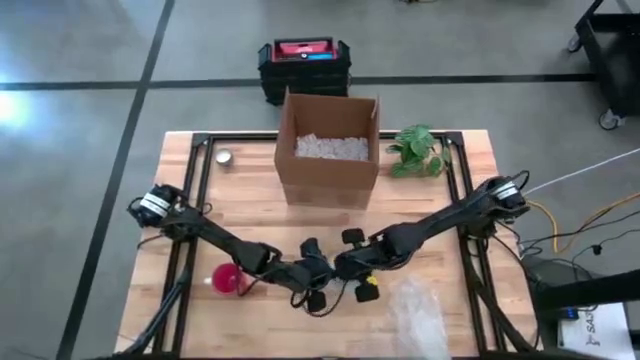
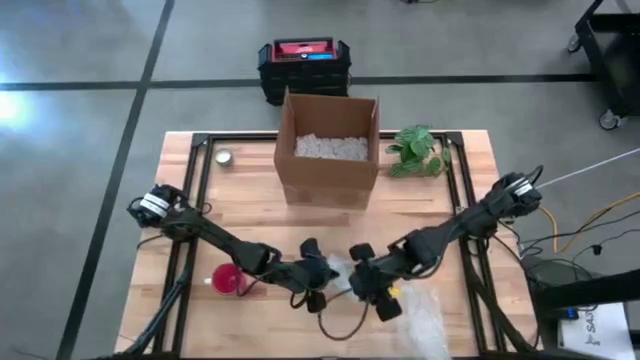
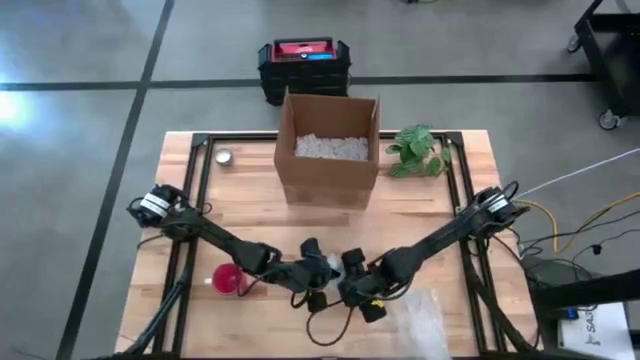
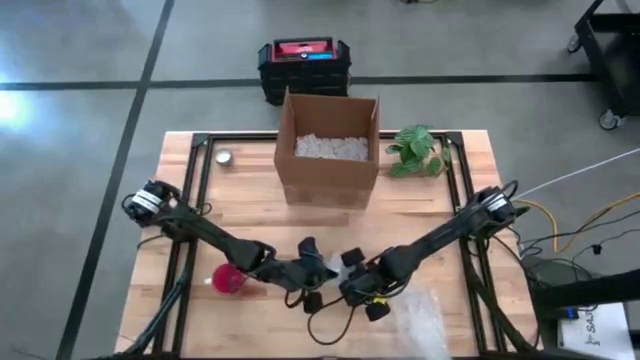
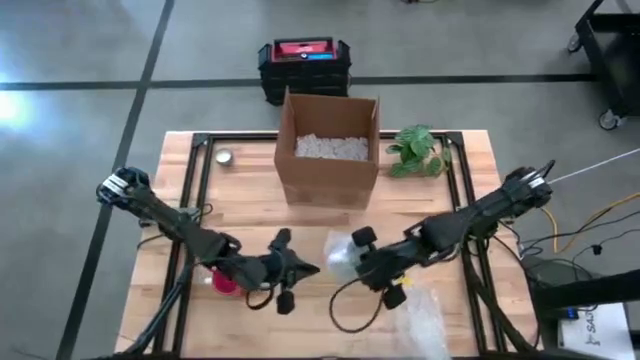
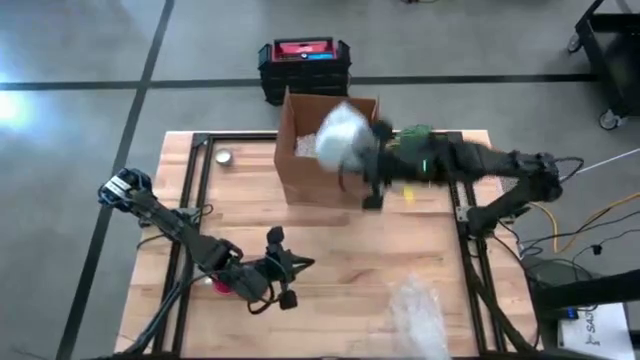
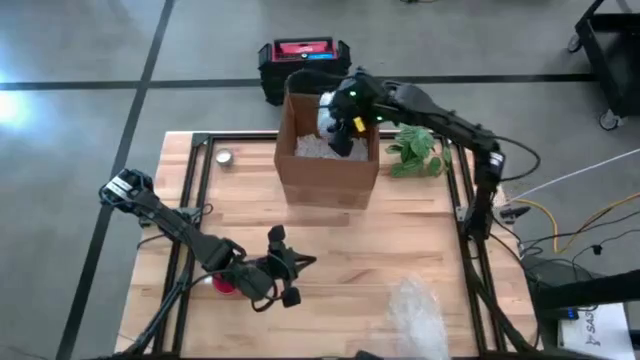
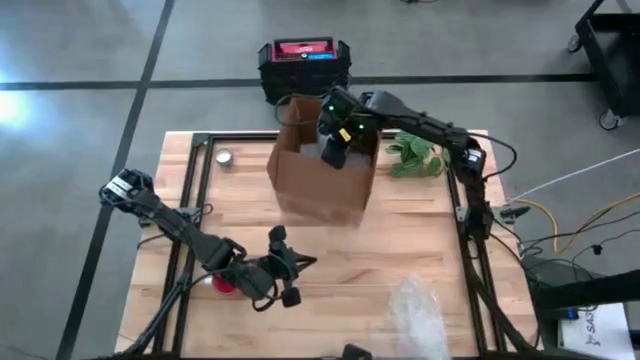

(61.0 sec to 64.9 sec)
Task: wrap mug
Put the wrapped white mug into the cardboard box

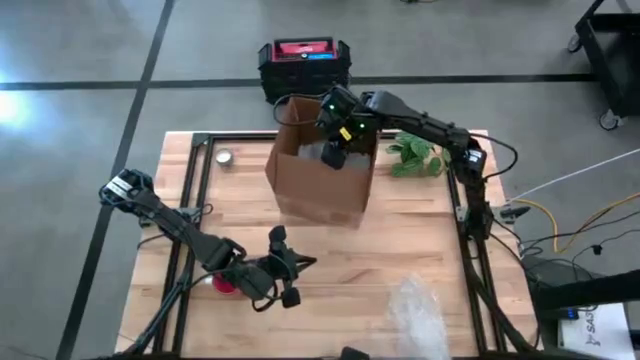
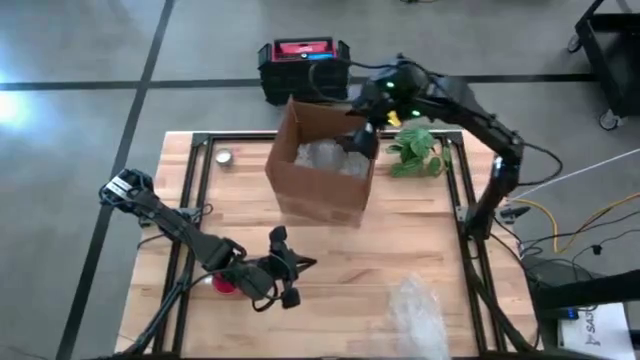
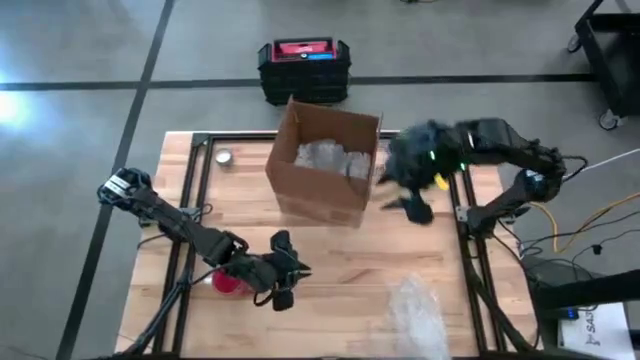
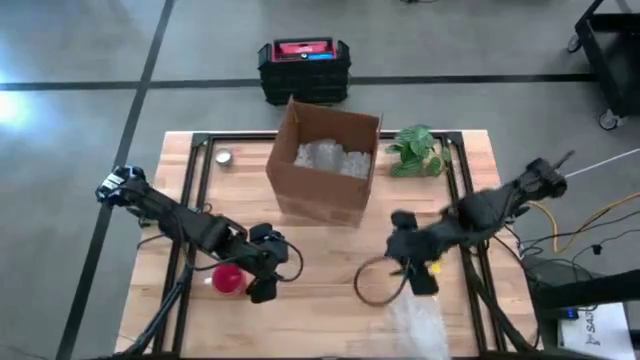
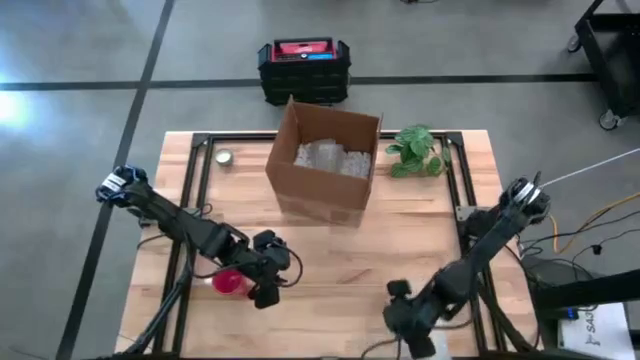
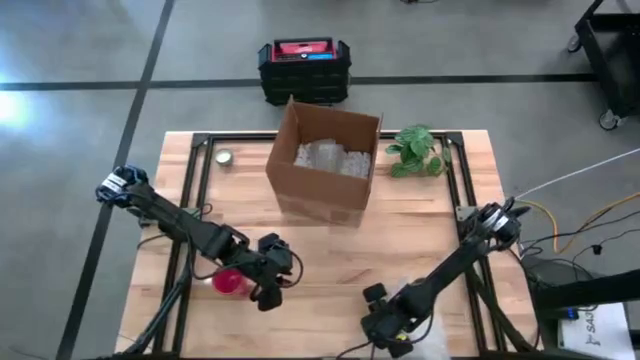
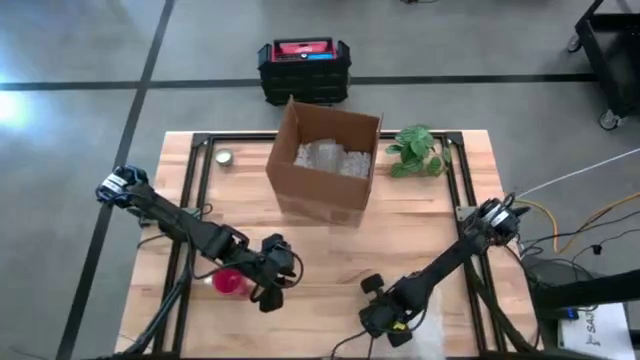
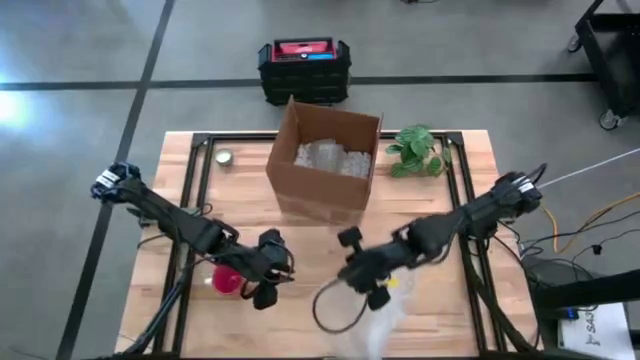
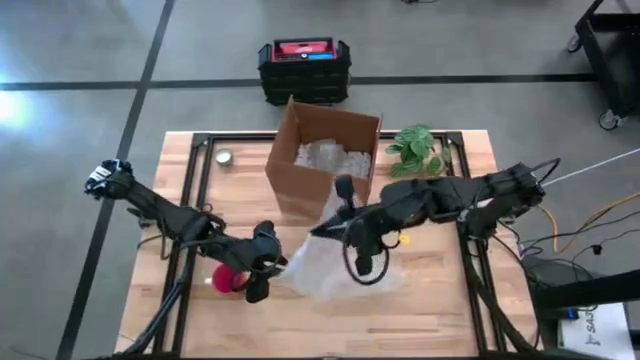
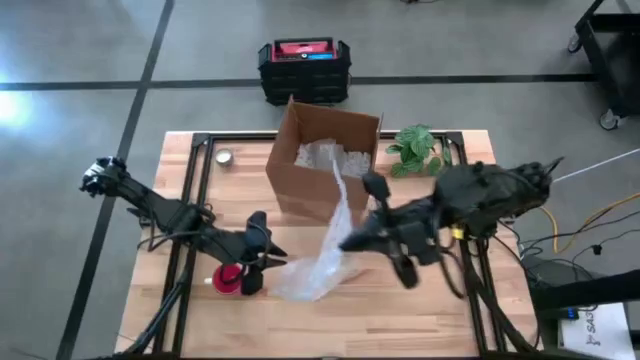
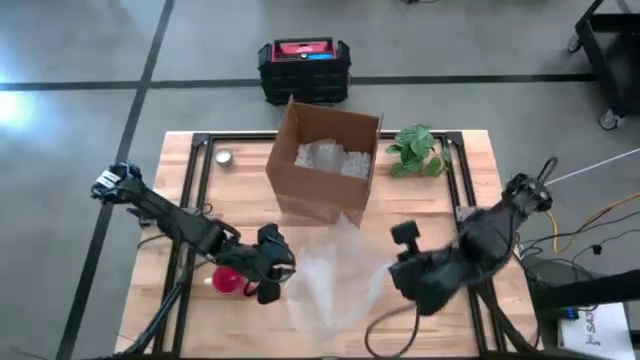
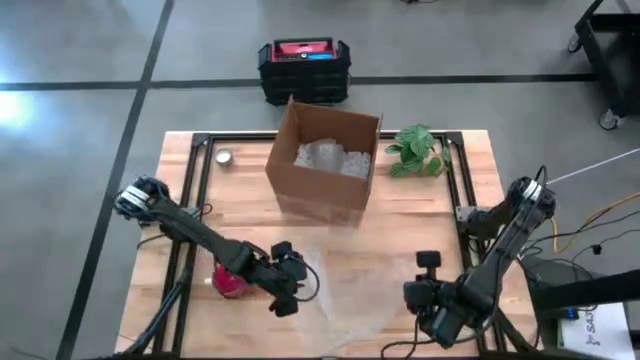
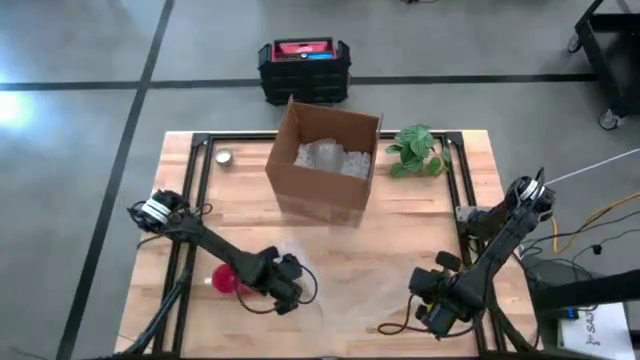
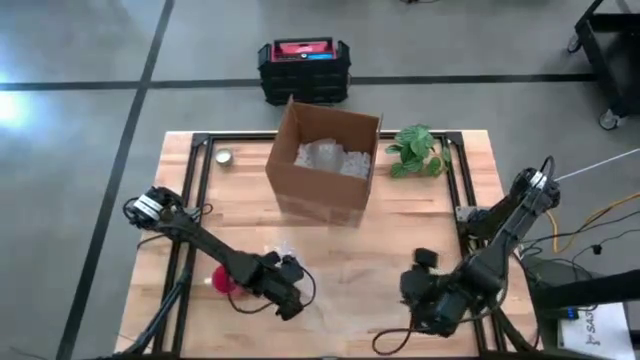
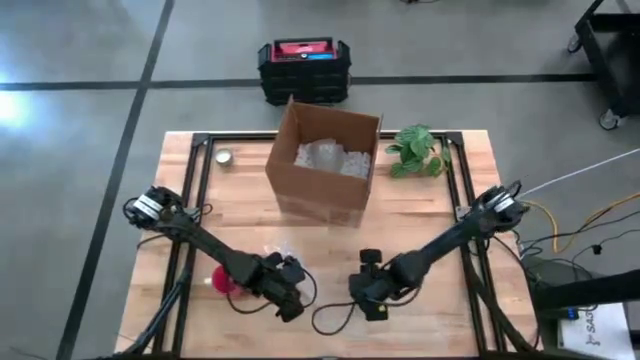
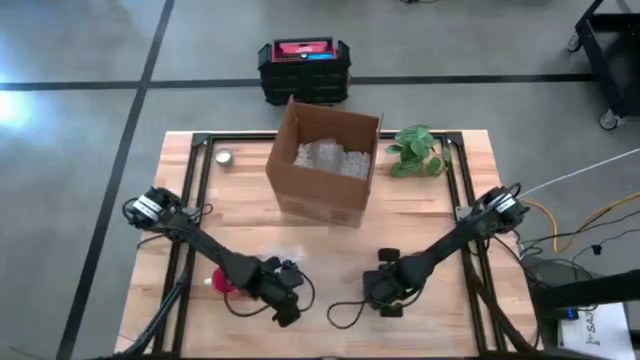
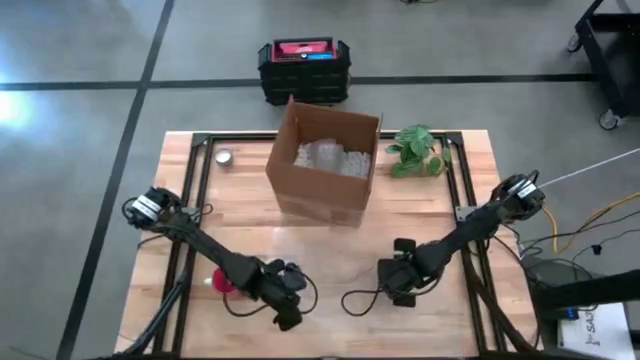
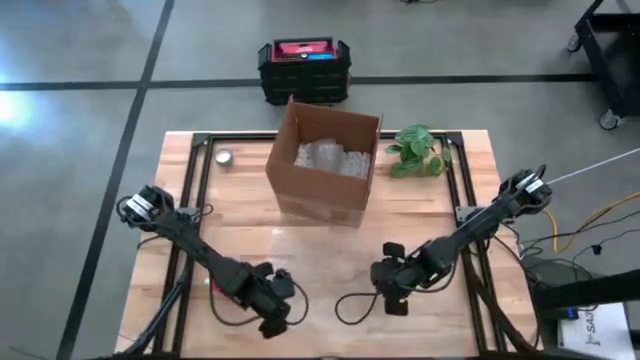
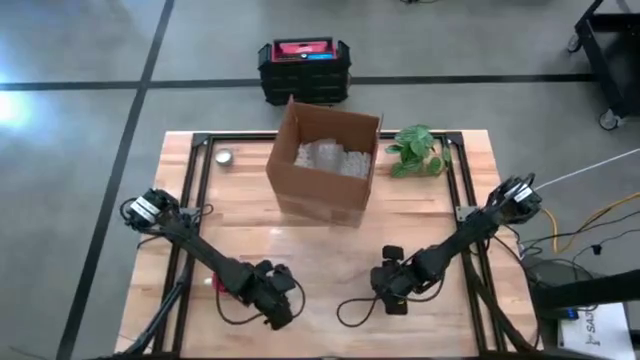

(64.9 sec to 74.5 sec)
Prepare the bubble wrap

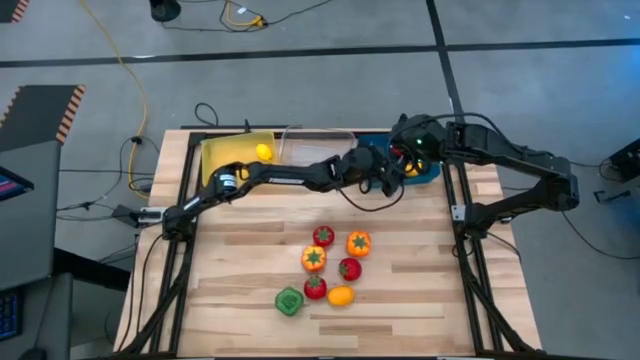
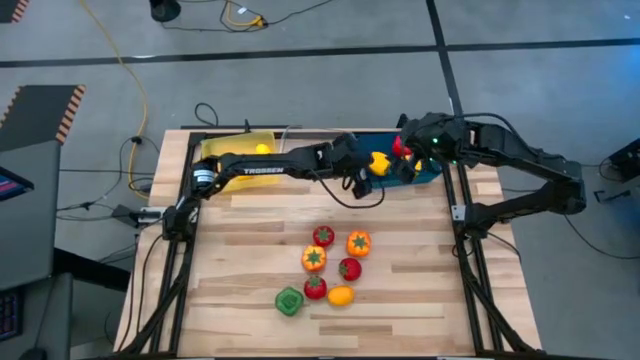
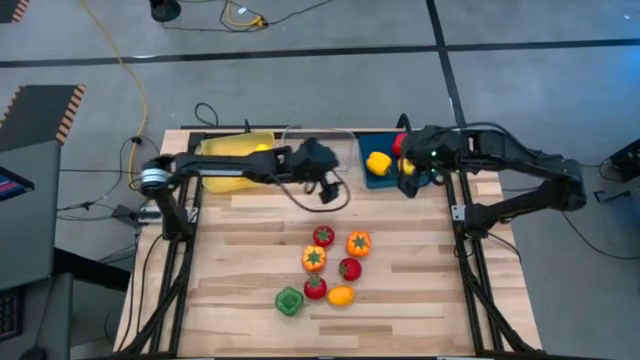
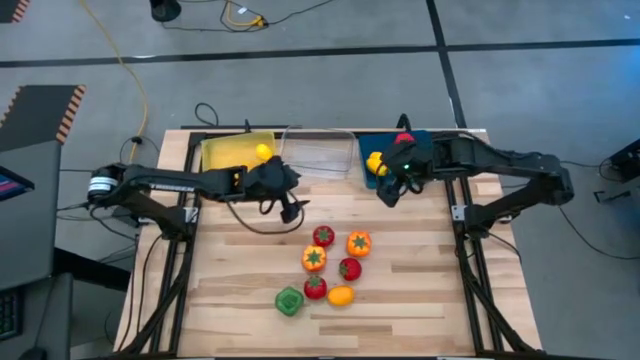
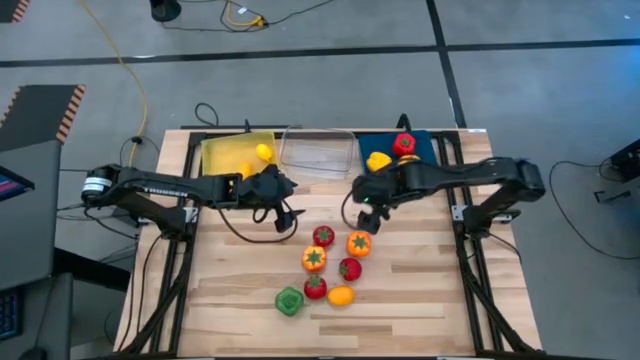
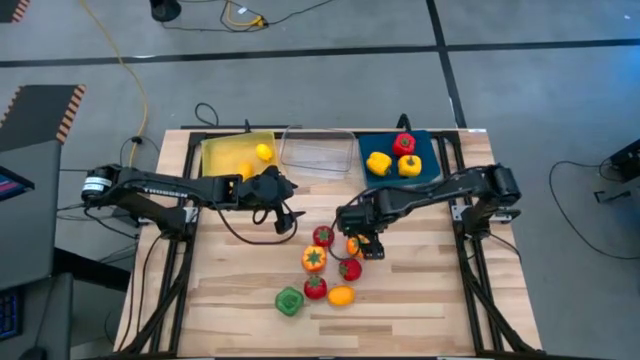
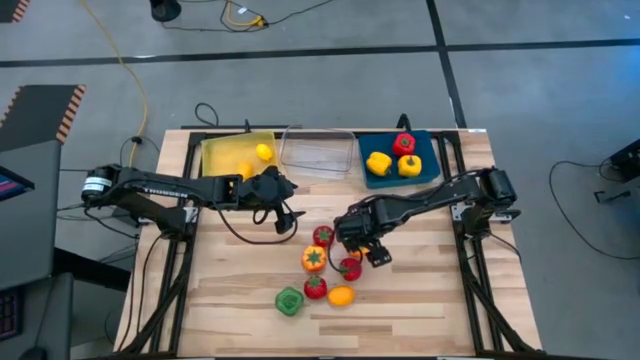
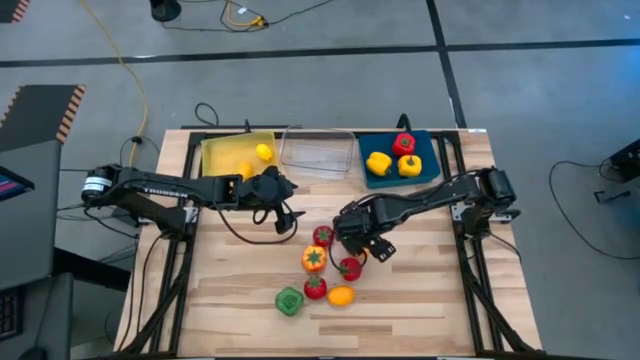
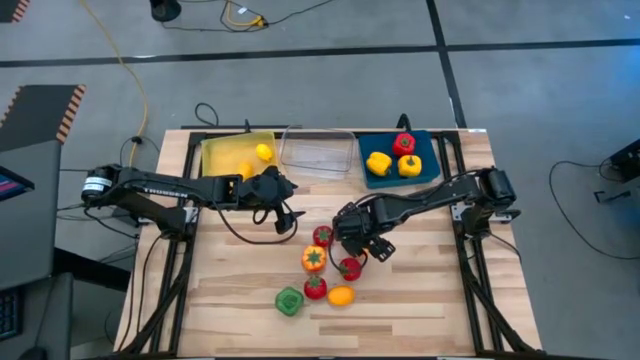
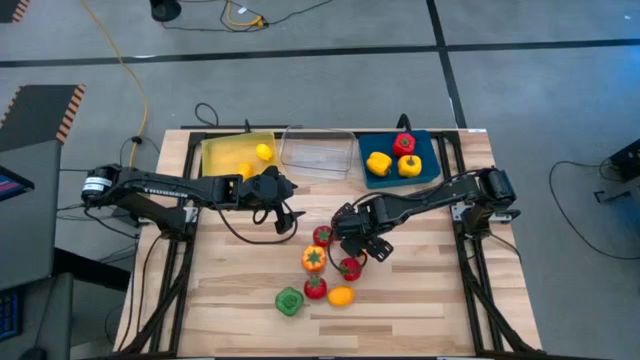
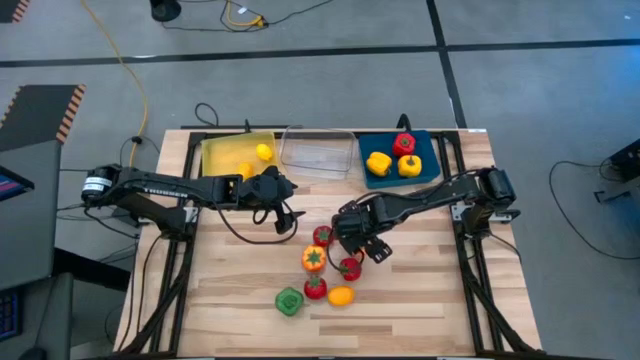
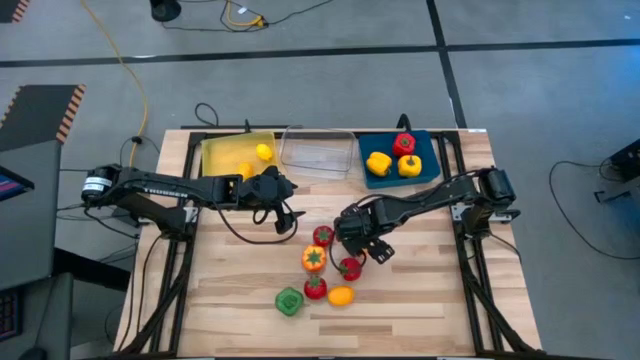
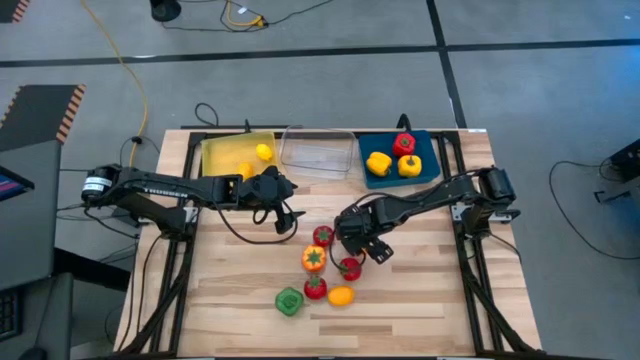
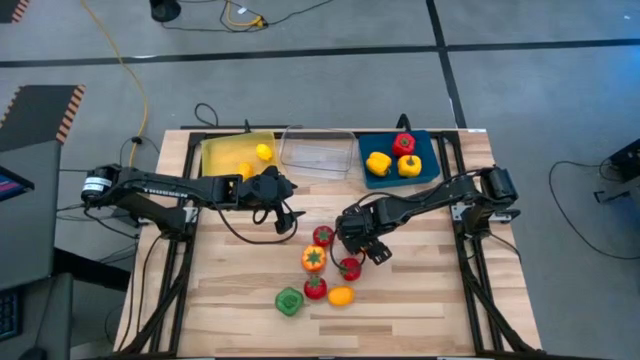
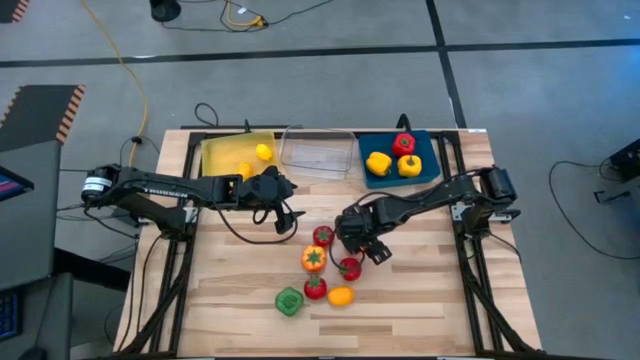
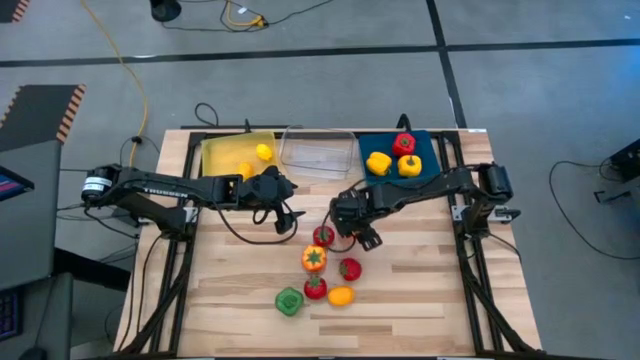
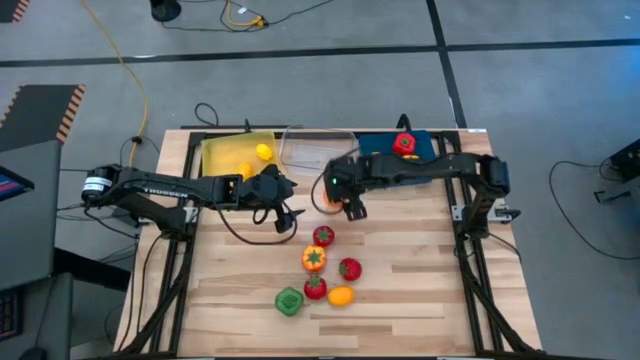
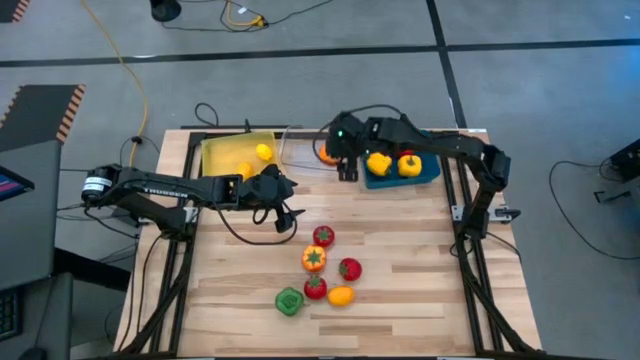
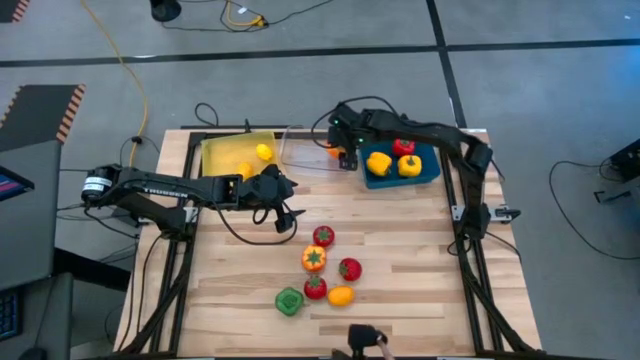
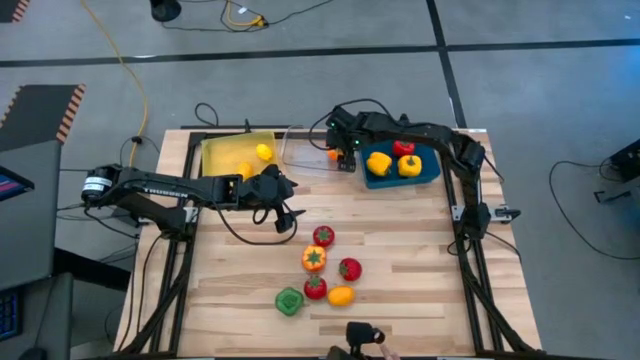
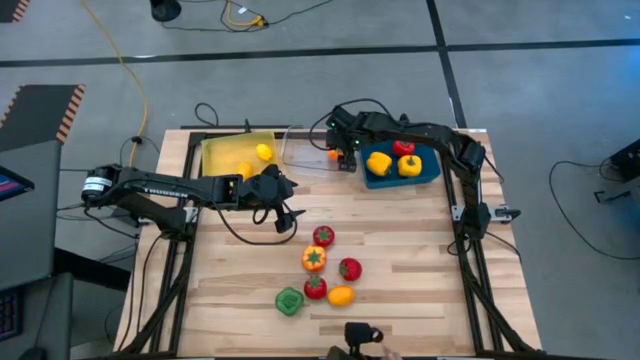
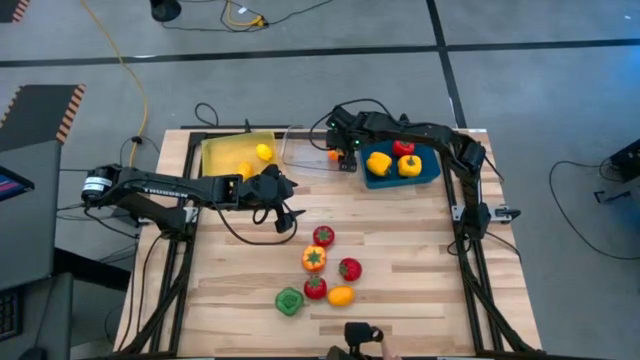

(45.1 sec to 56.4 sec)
Task: Sort produce into baskets
Put the right orange tomato into the transparent bin
